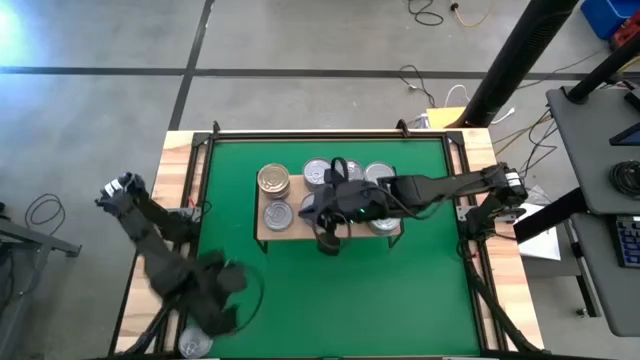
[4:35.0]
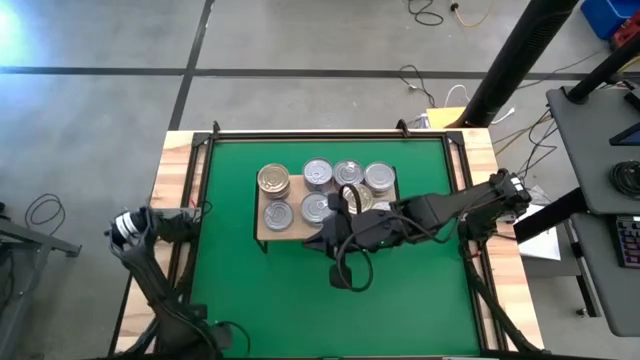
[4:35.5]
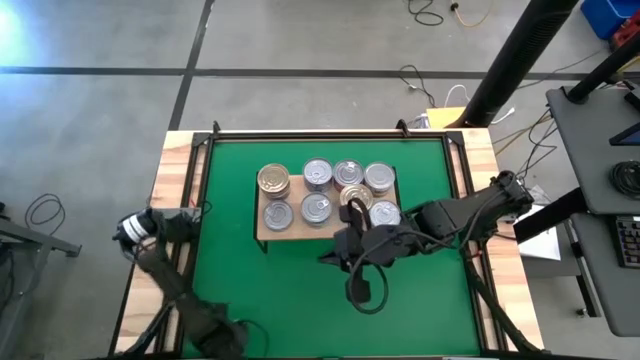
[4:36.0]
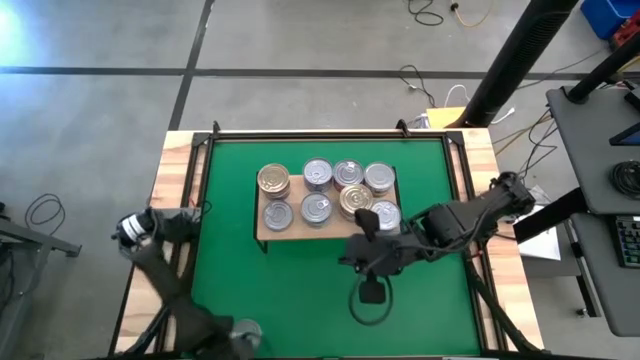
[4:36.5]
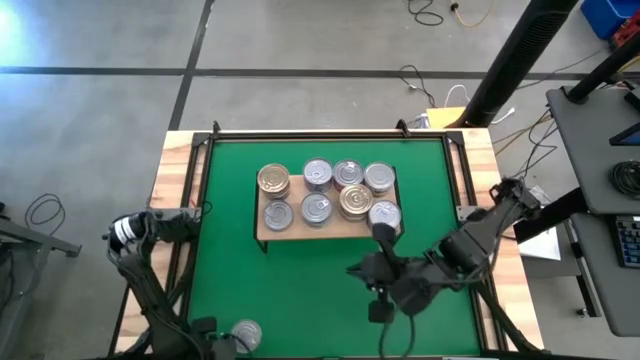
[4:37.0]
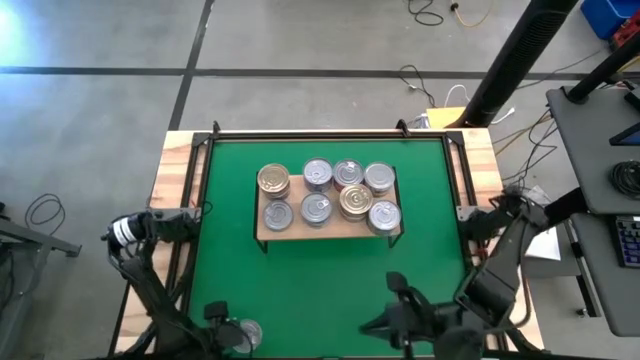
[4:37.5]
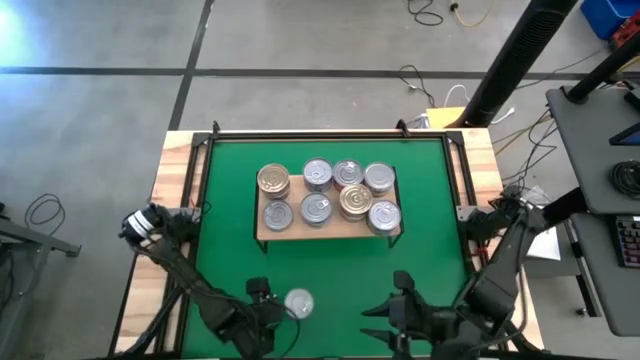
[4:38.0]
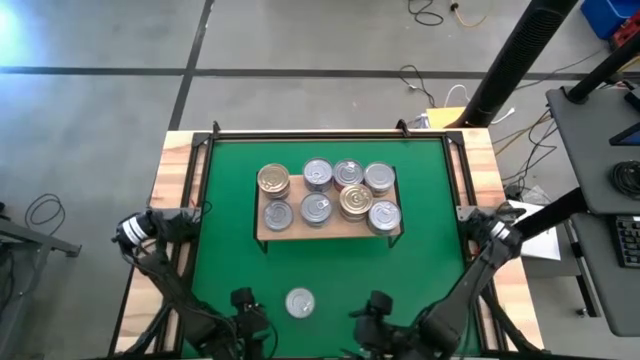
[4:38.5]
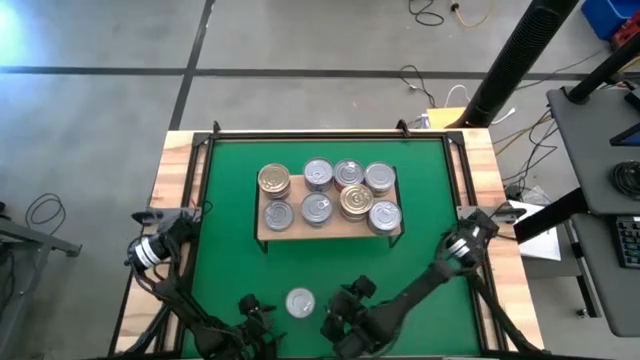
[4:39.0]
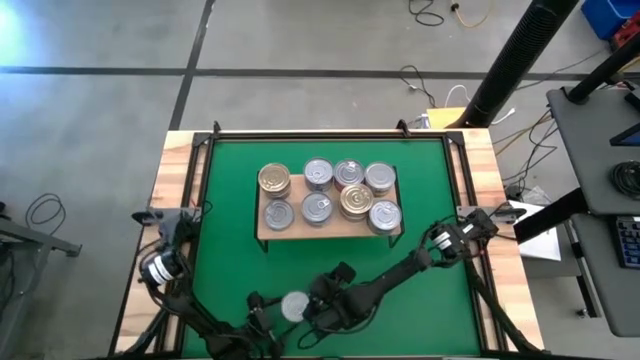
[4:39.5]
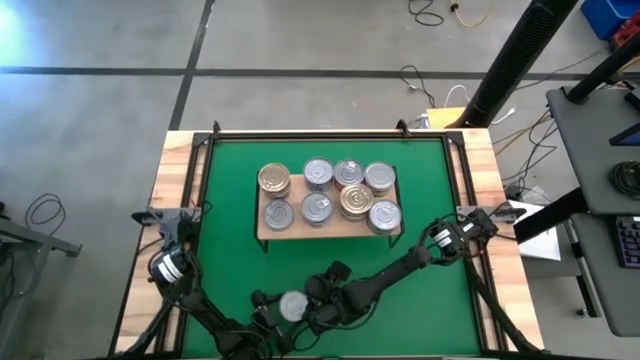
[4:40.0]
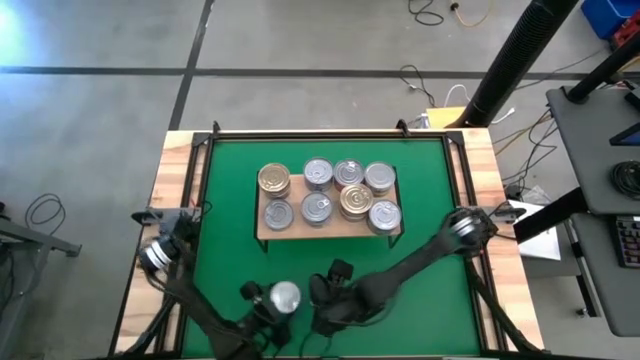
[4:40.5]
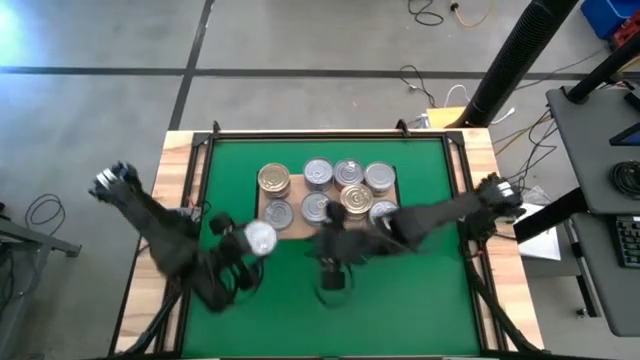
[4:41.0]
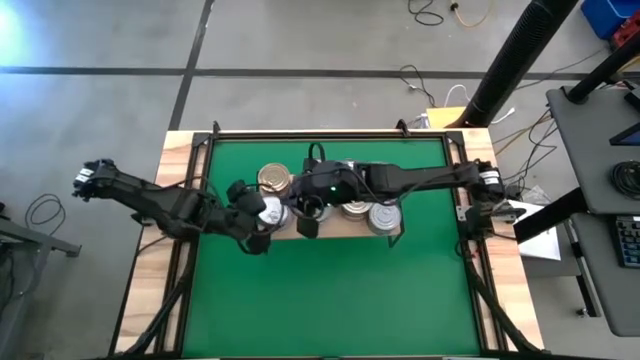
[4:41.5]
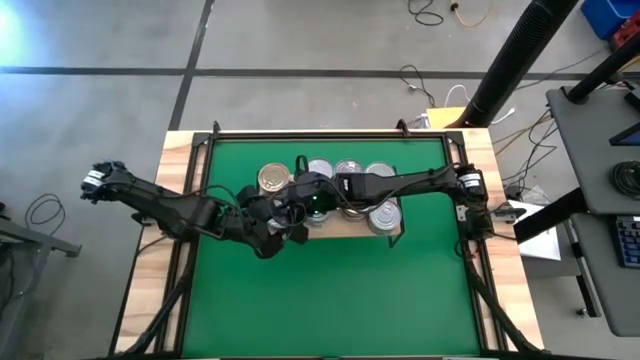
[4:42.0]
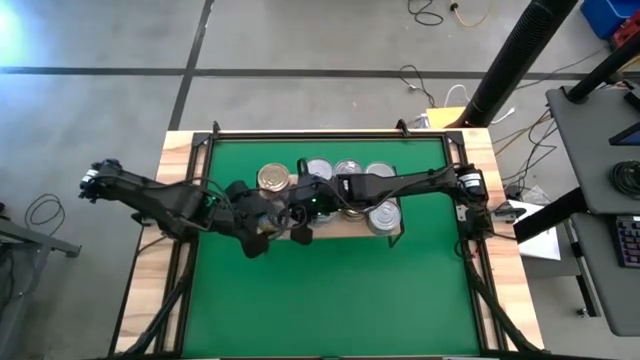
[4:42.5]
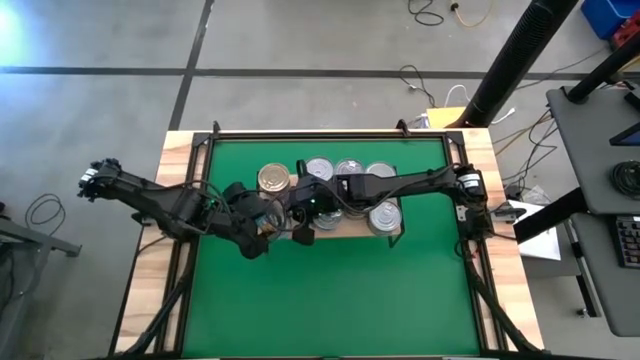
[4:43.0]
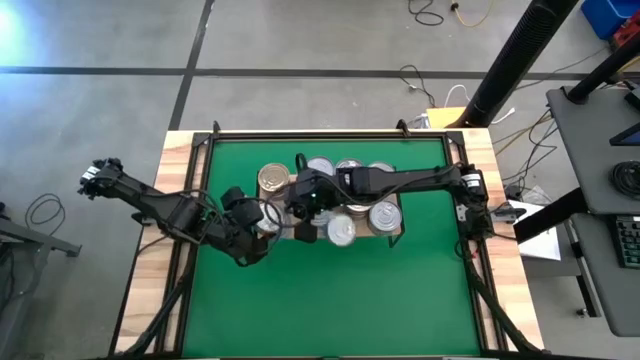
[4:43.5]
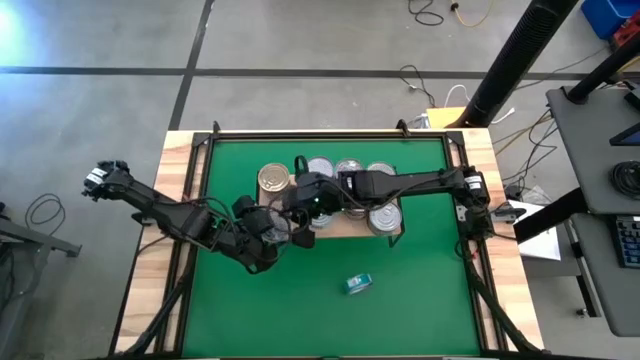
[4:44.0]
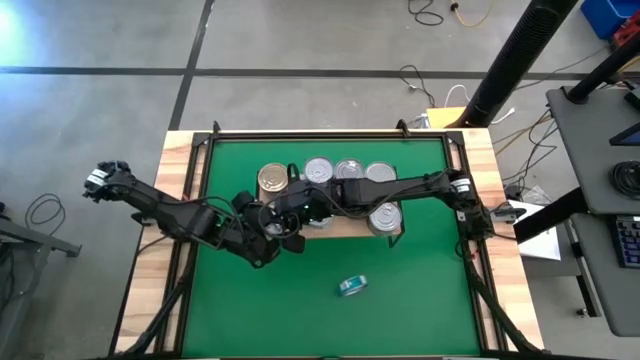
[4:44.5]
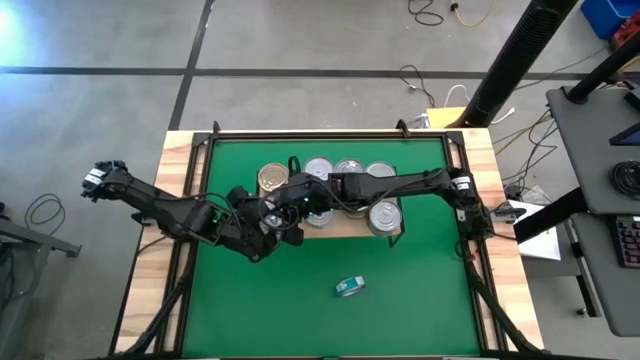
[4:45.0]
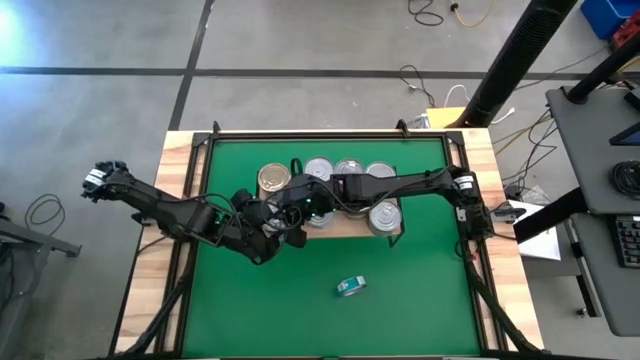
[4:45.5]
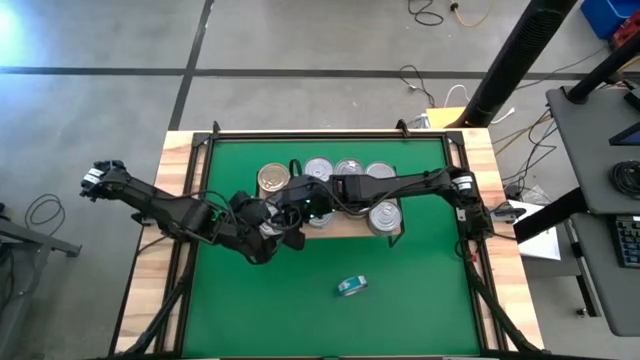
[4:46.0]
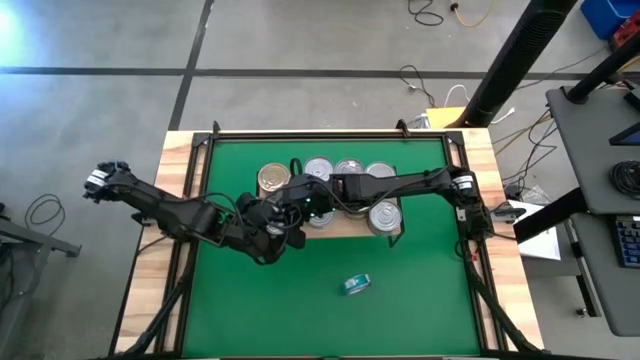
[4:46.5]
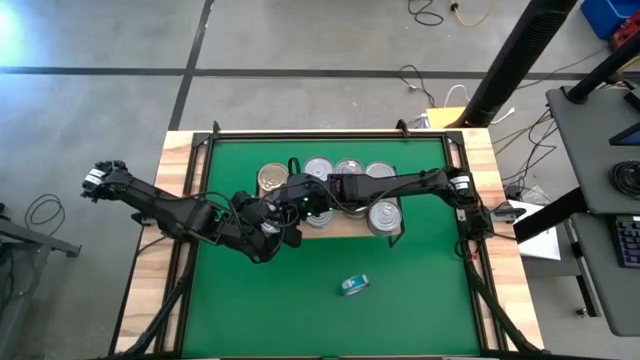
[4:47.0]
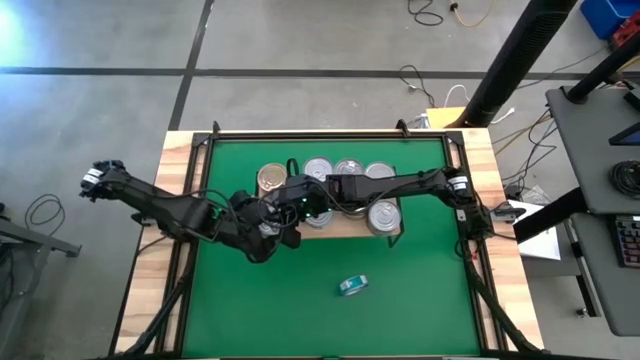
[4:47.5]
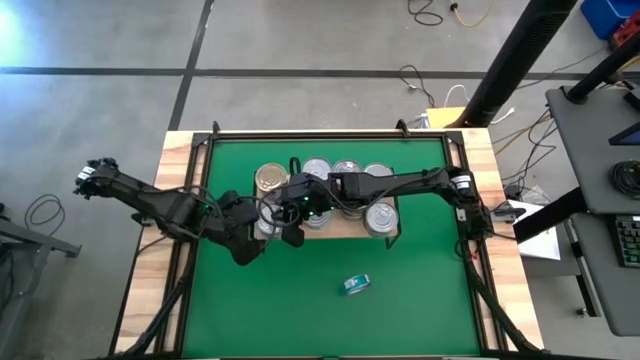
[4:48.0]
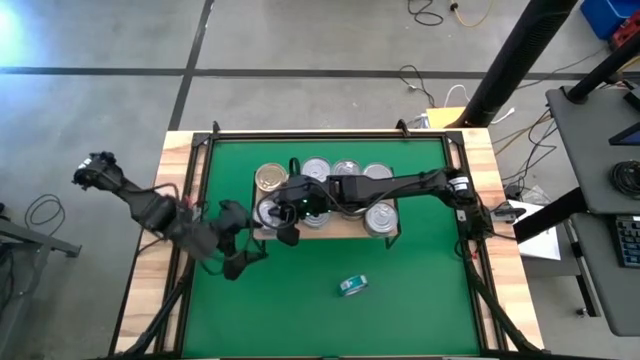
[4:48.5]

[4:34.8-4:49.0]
Task: Stack canned seafood by type on shelf
Stack the yellow and blue tuna can on top of the yellow and blue tuna can
